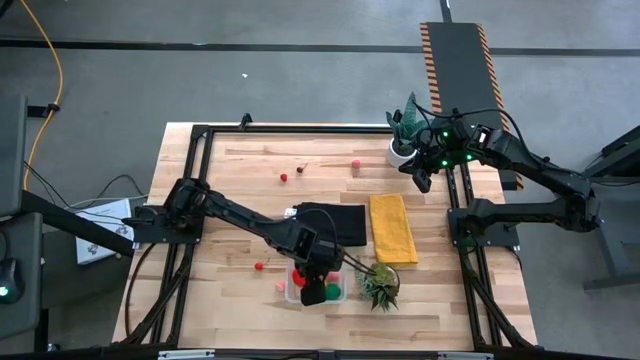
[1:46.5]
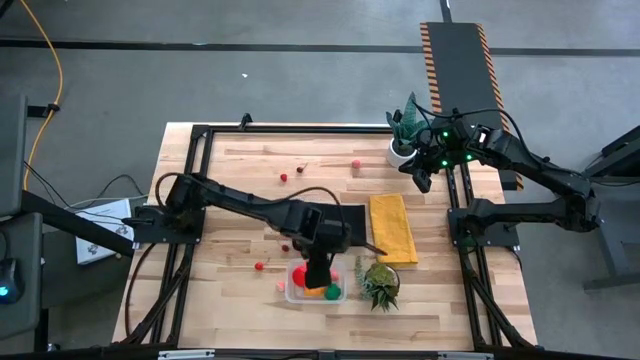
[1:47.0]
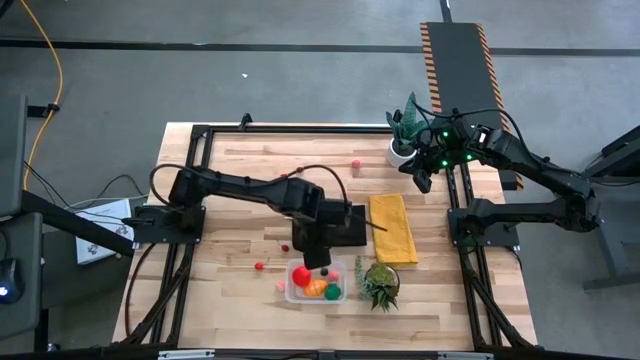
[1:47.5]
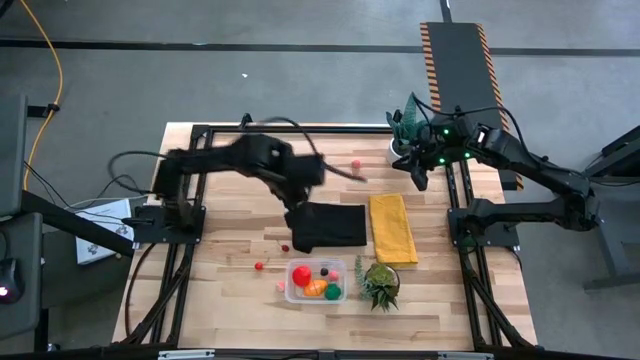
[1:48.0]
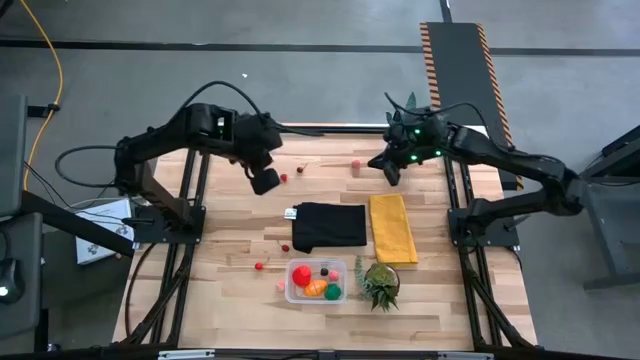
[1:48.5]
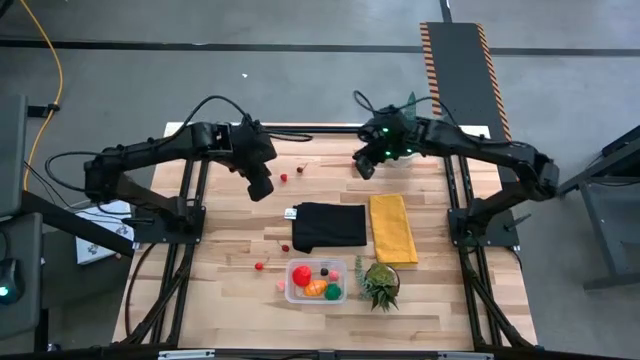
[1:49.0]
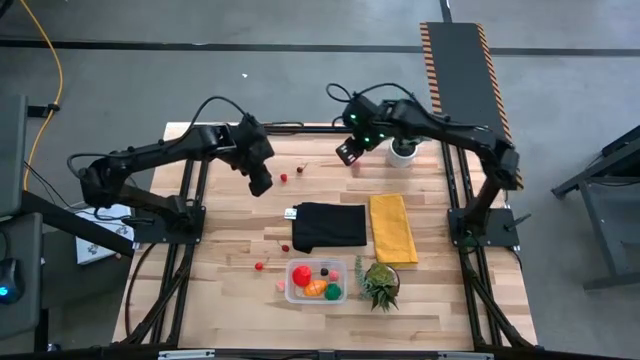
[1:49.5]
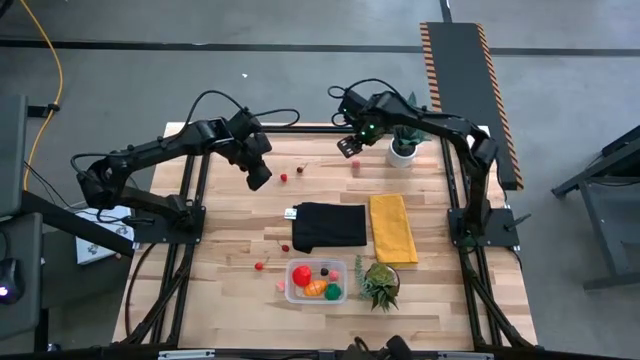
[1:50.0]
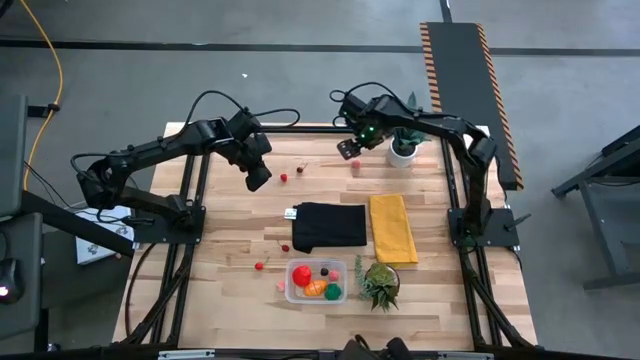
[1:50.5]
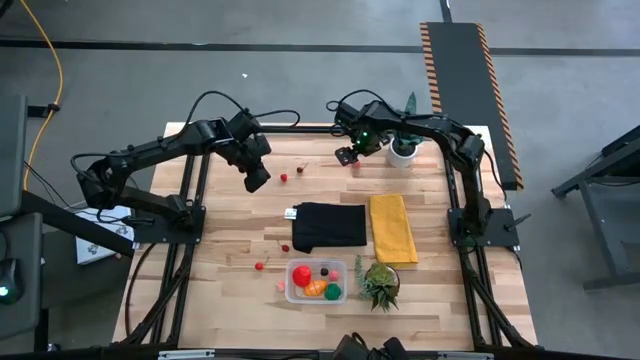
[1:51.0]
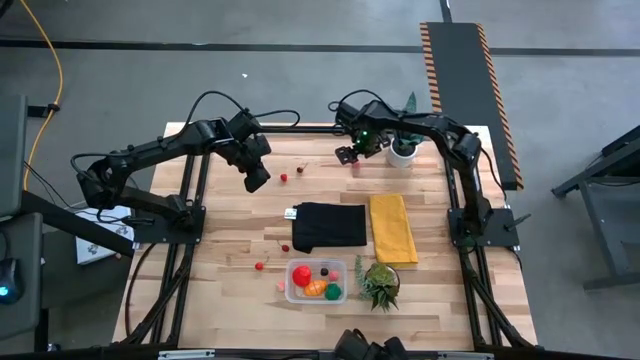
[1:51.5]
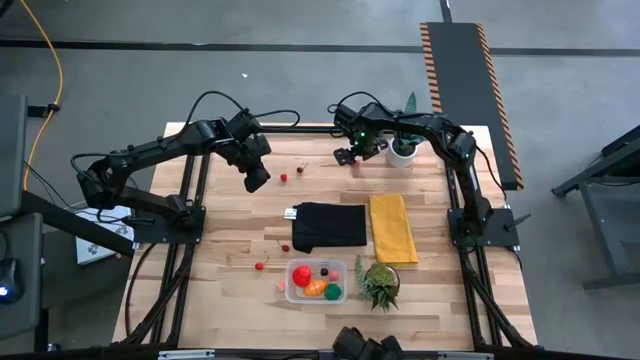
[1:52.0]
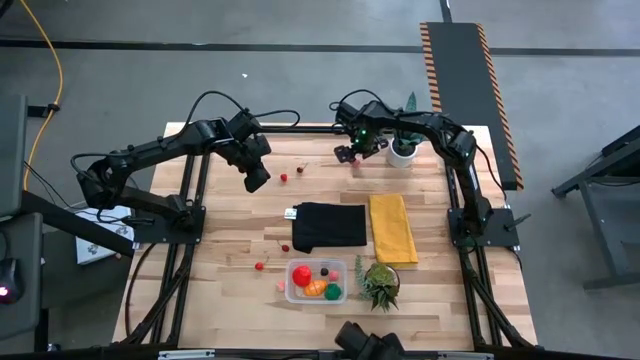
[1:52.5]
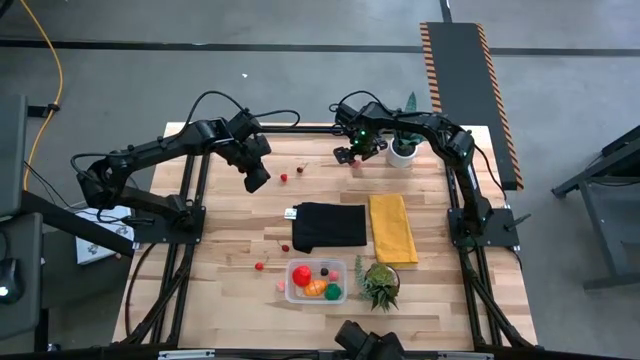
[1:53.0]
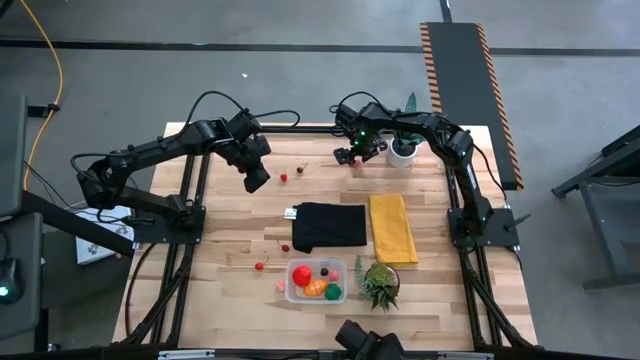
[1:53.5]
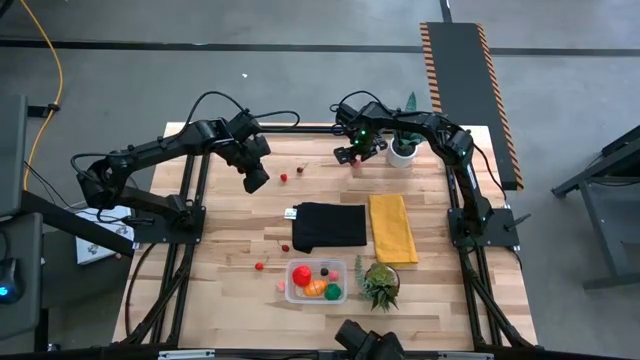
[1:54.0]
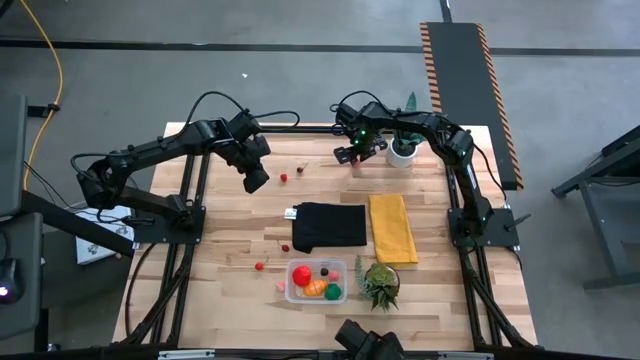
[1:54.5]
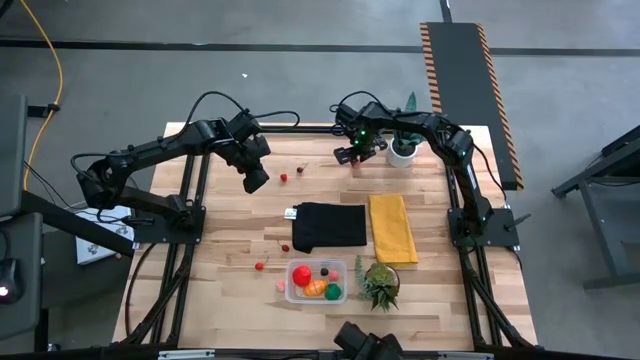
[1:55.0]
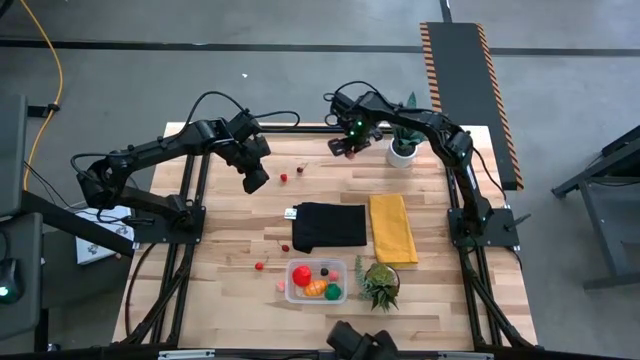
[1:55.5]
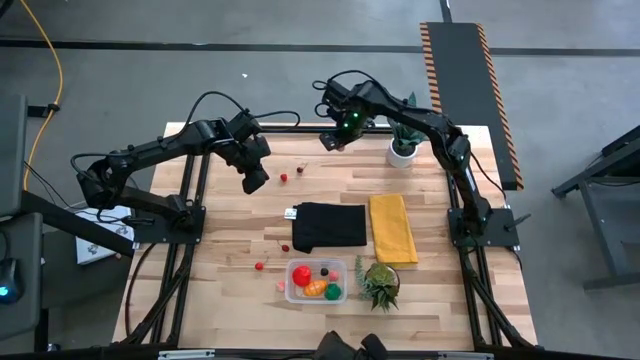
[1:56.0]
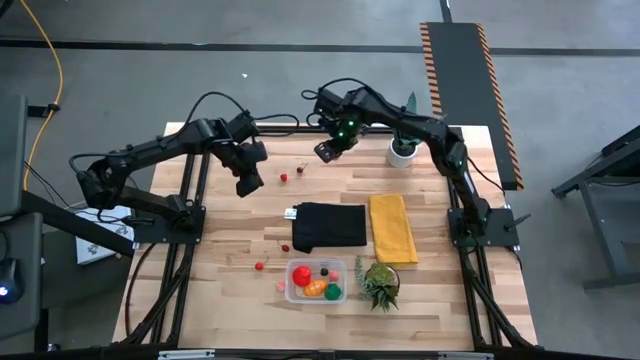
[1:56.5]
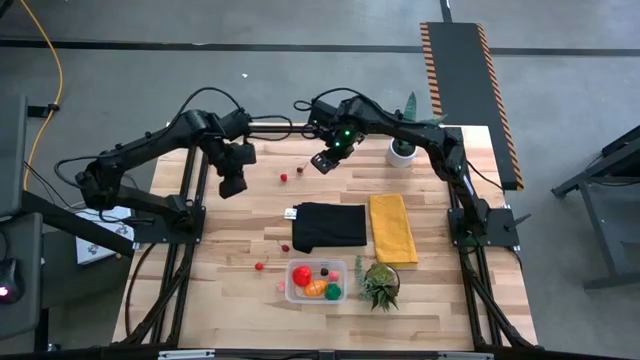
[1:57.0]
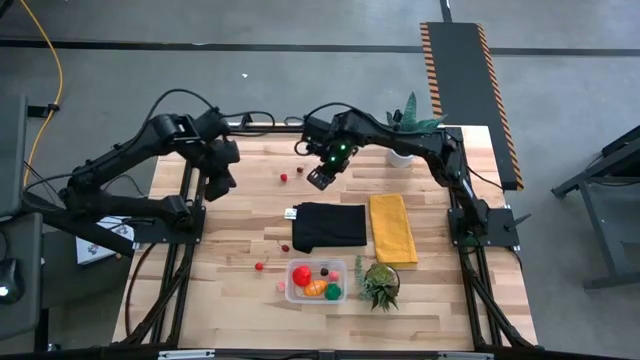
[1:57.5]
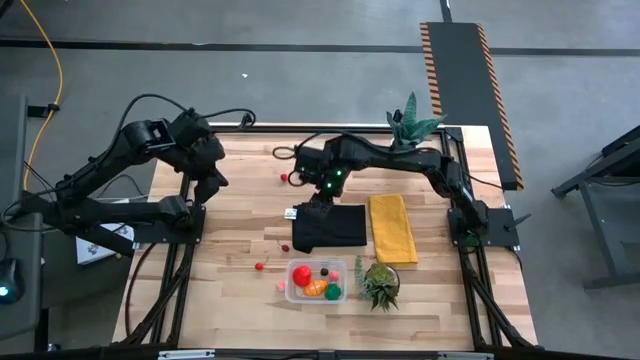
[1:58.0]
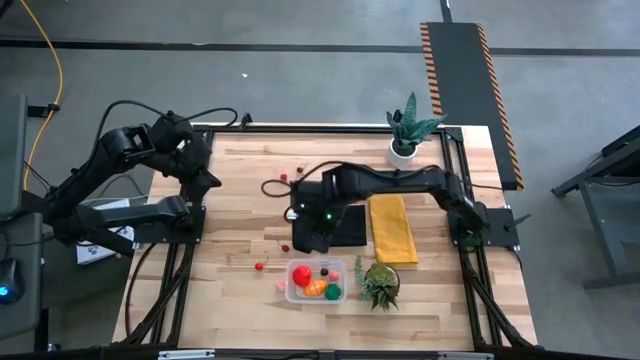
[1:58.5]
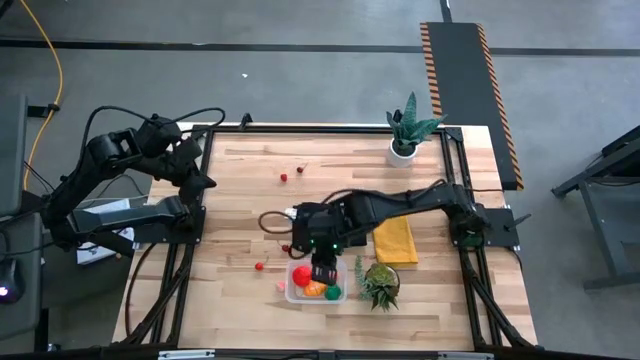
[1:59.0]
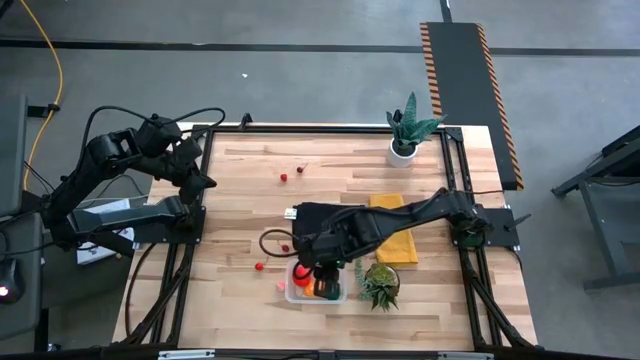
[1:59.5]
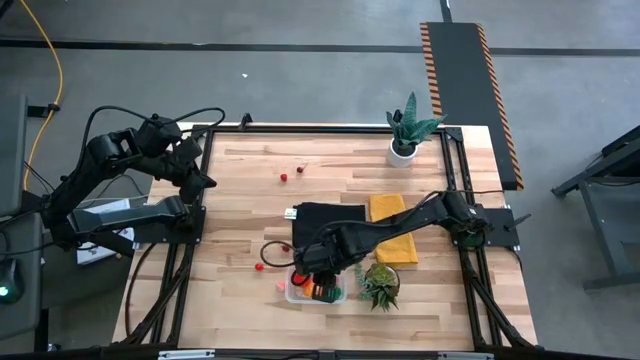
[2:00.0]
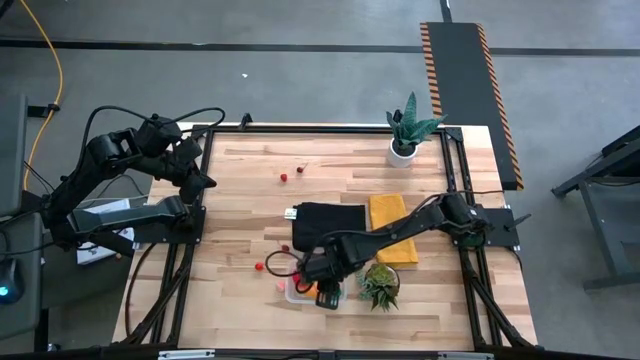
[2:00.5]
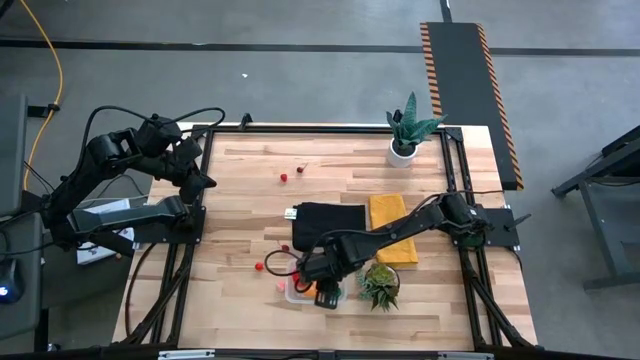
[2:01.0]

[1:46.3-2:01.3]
Task: Pick and placing Produce into tupperware
Put the top peach into the transparent bin

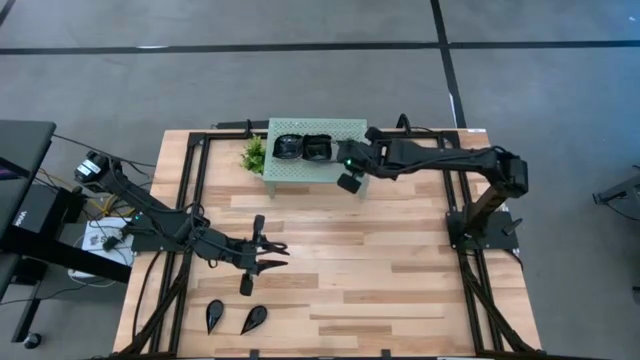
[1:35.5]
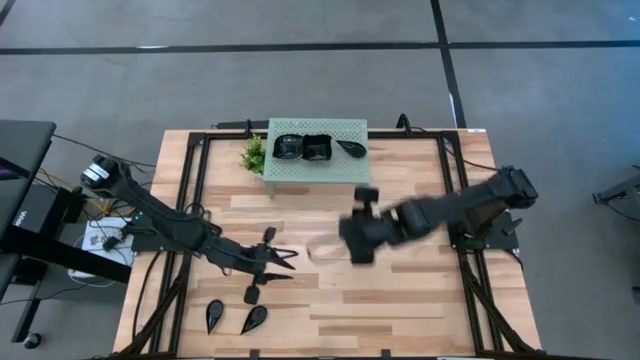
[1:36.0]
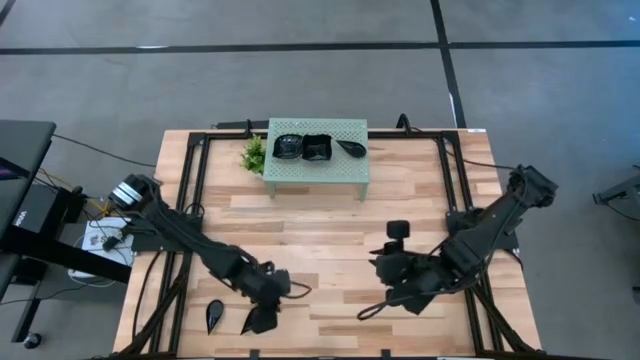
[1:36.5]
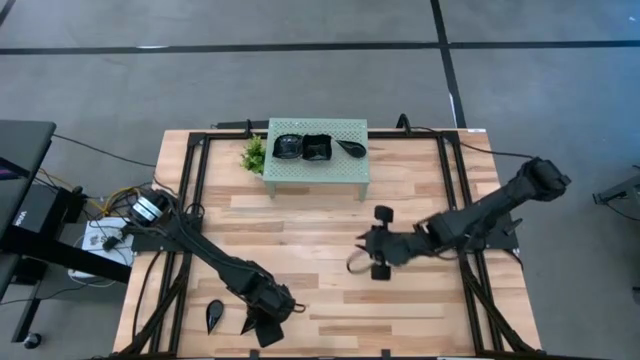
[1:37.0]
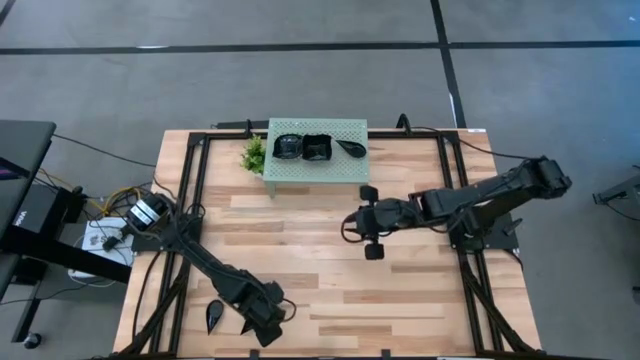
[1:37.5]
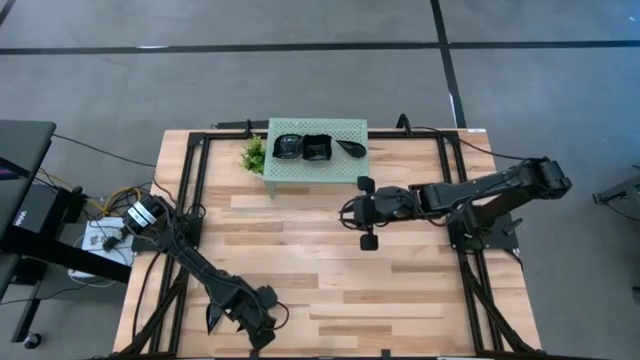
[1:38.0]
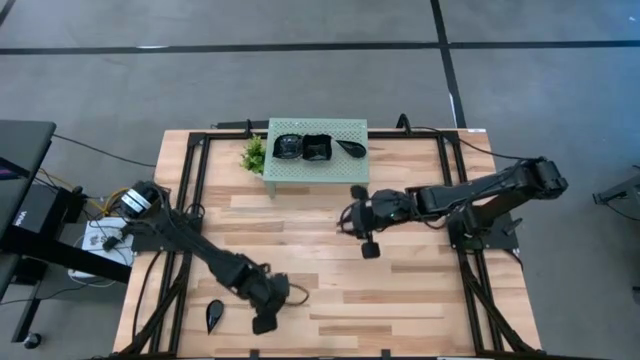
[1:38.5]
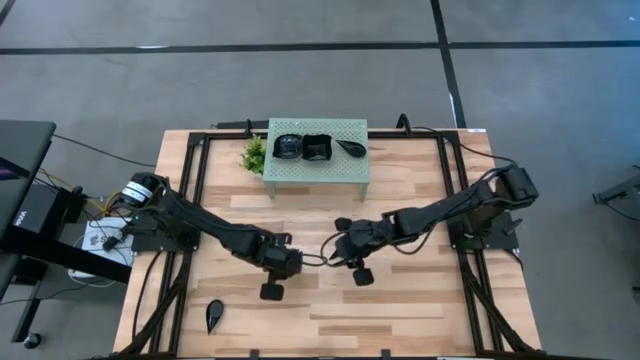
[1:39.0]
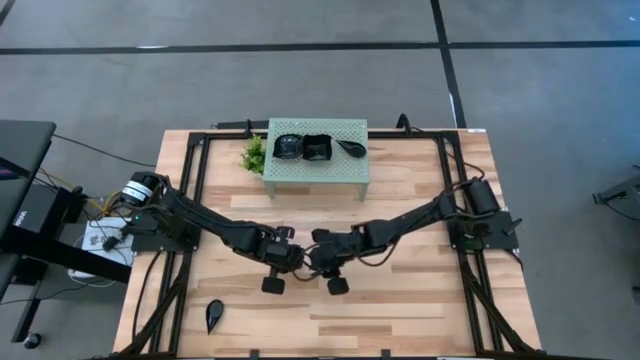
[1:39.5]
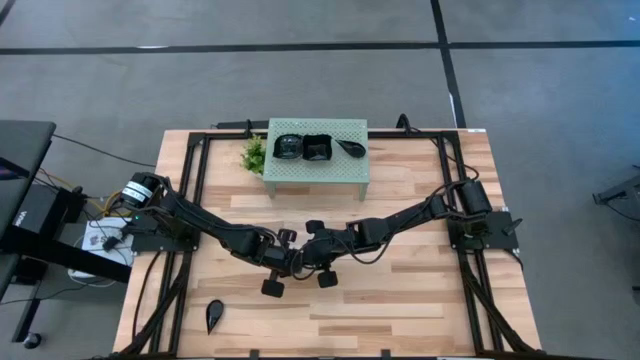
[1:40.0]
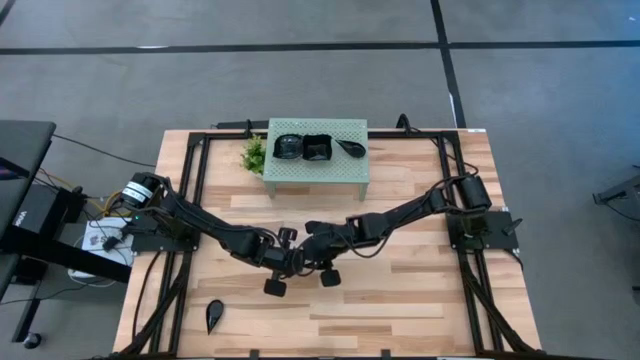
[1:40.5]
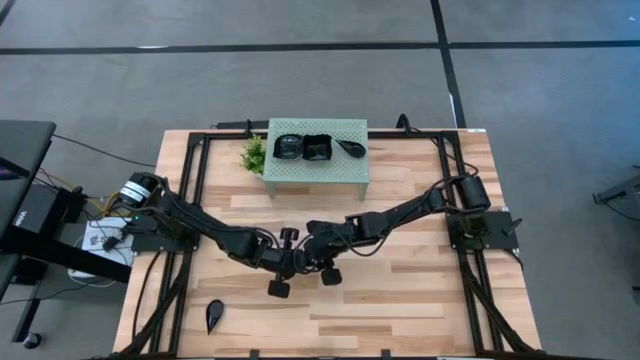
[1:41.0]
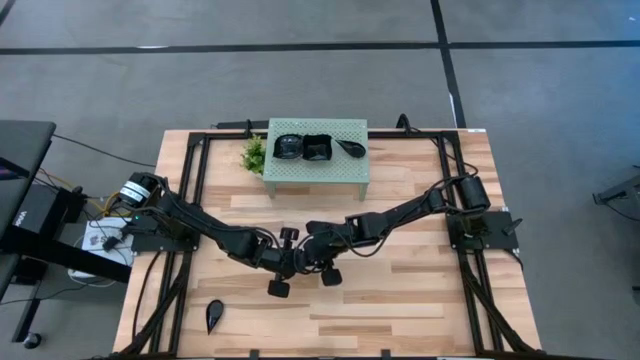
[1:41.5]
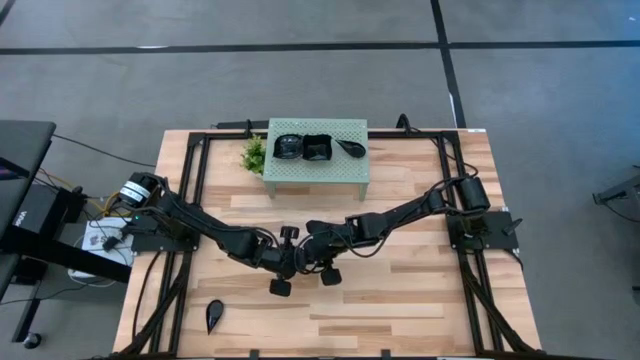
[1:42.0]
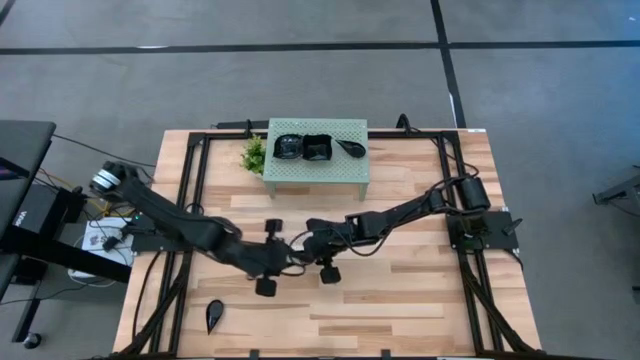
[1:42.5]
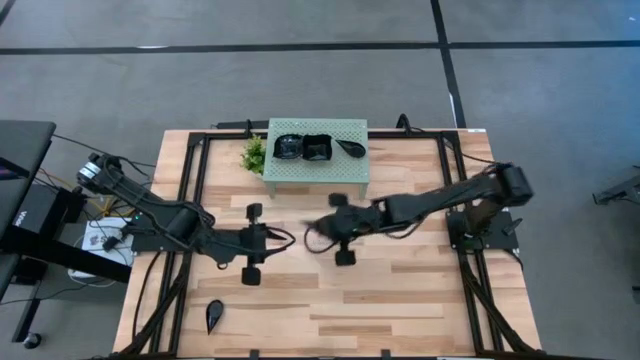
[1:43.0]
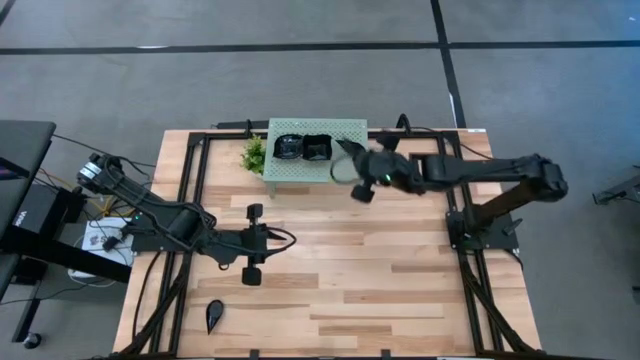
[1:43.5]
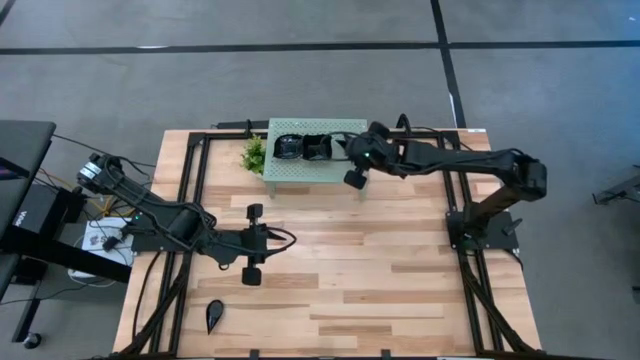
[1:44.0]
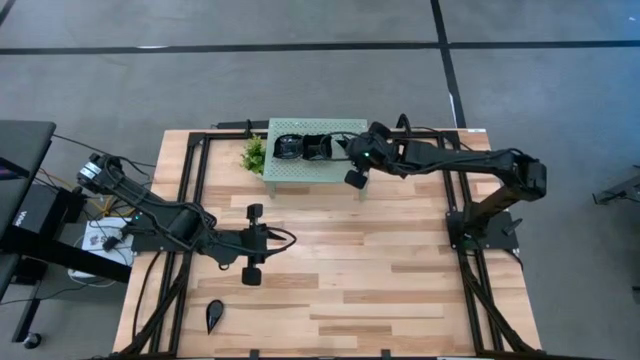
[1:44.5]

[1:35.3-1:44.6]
Task: Pick & Place Mini shaped plates
Stack the drop-shaped plate on top of the other drop-shaped plates on the shelf
